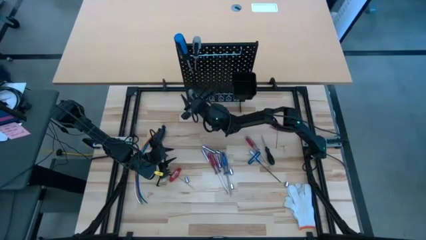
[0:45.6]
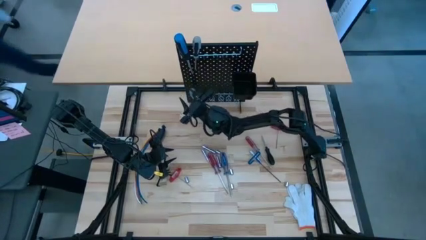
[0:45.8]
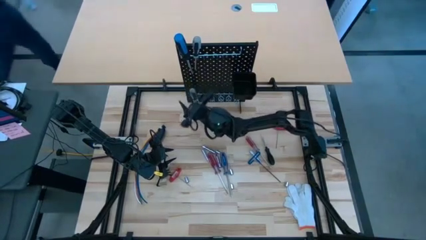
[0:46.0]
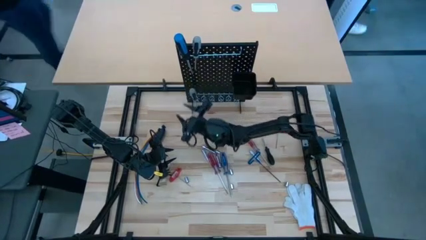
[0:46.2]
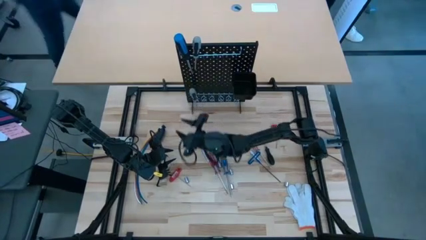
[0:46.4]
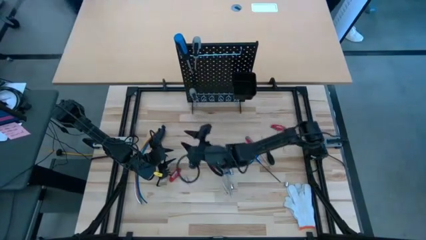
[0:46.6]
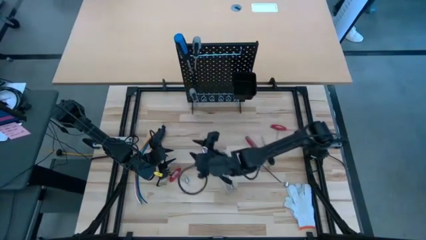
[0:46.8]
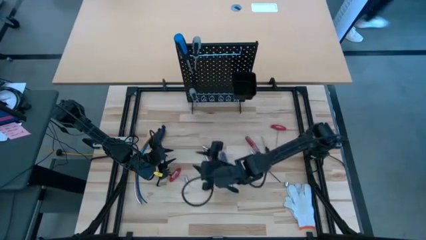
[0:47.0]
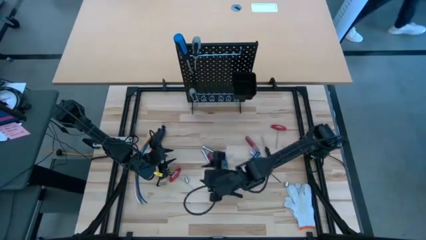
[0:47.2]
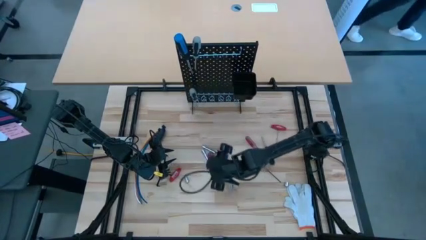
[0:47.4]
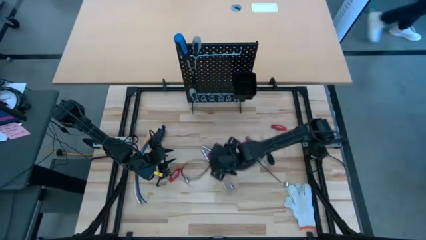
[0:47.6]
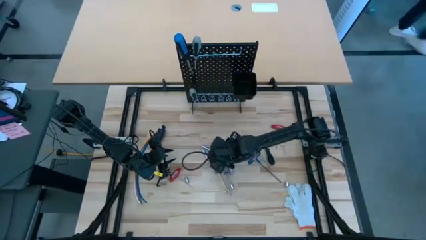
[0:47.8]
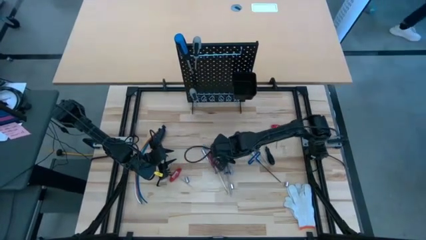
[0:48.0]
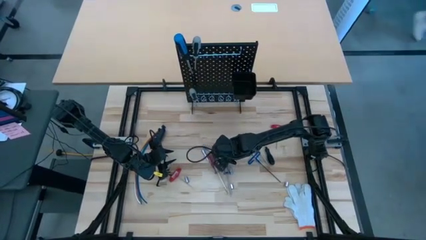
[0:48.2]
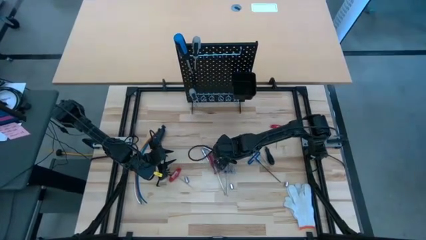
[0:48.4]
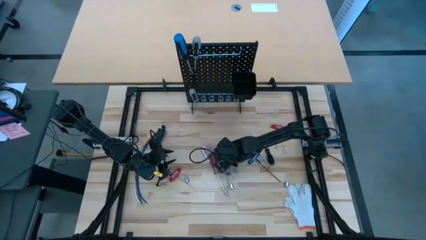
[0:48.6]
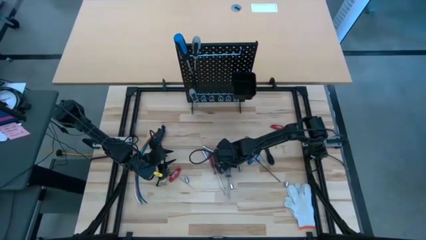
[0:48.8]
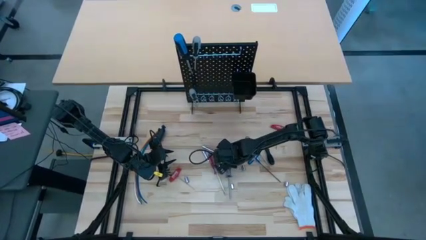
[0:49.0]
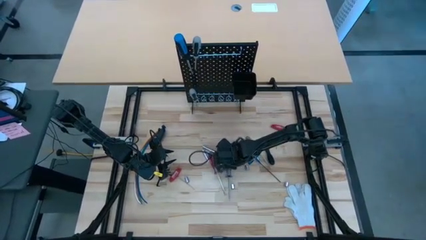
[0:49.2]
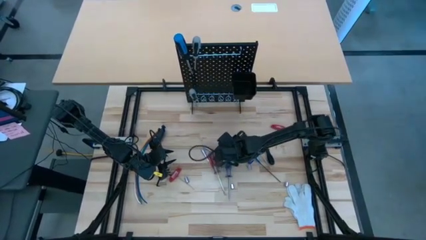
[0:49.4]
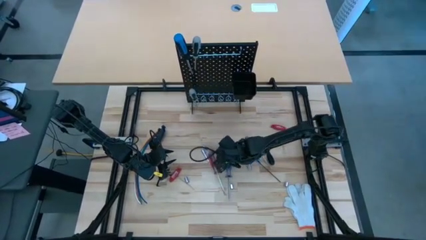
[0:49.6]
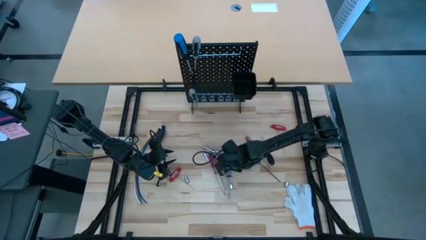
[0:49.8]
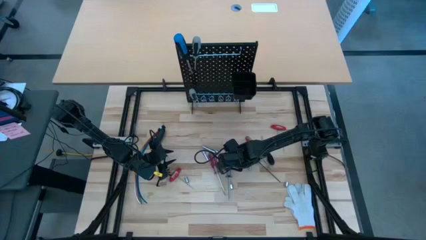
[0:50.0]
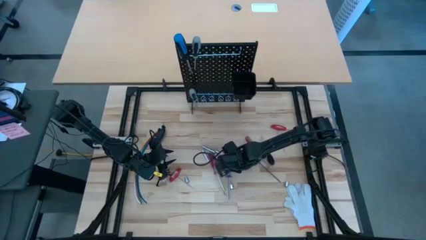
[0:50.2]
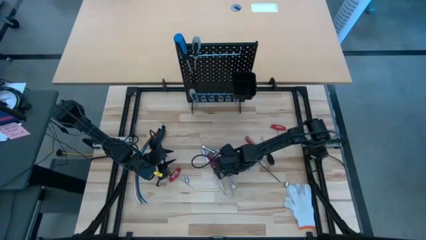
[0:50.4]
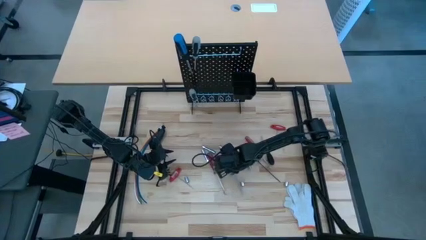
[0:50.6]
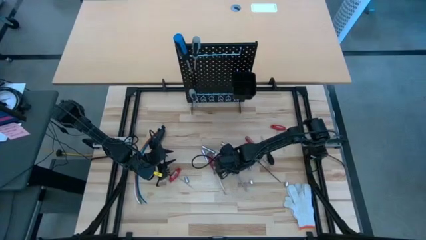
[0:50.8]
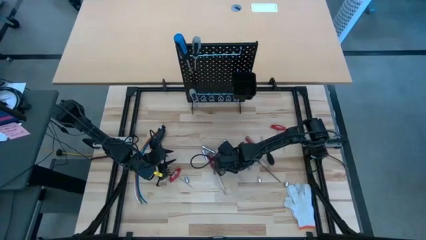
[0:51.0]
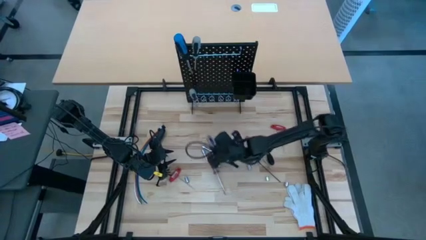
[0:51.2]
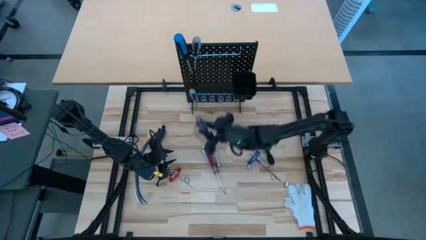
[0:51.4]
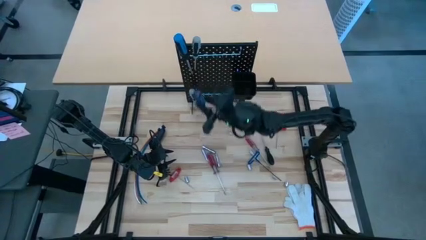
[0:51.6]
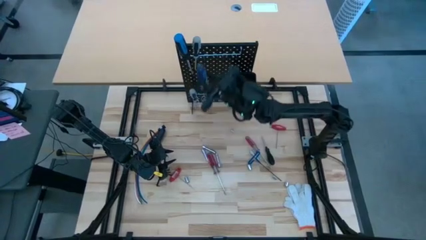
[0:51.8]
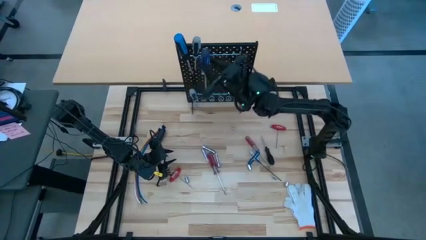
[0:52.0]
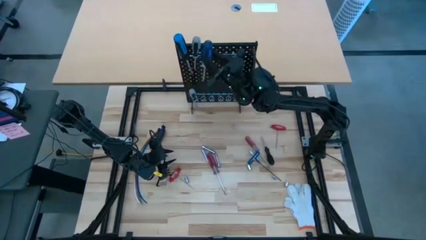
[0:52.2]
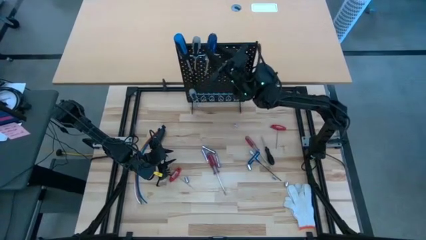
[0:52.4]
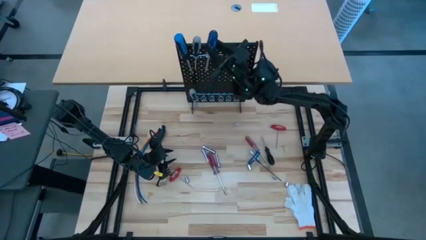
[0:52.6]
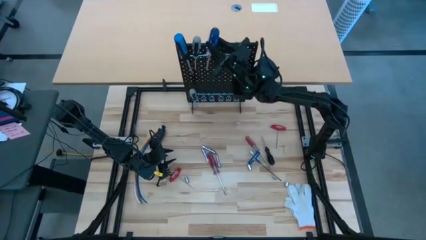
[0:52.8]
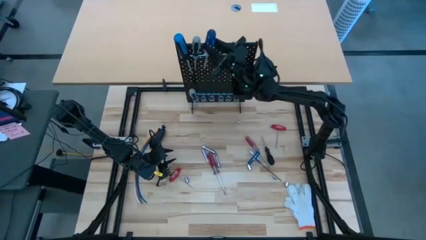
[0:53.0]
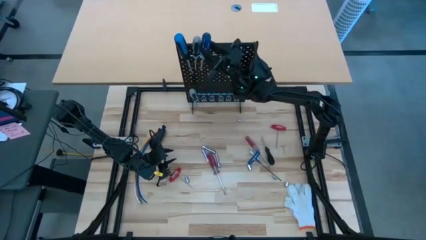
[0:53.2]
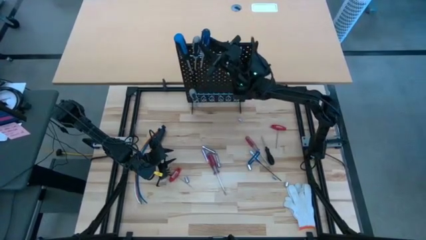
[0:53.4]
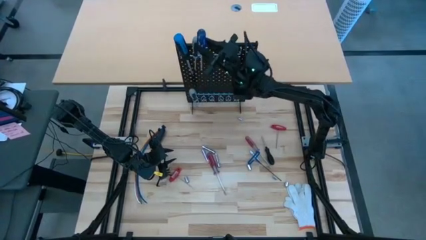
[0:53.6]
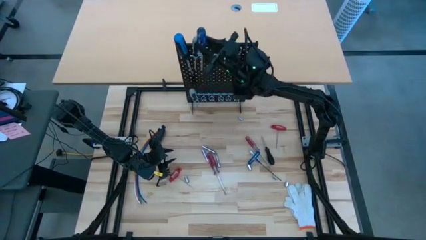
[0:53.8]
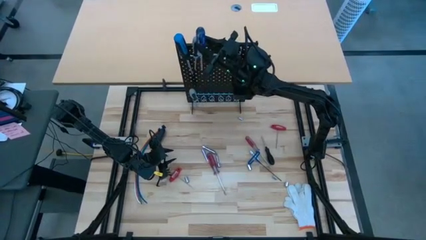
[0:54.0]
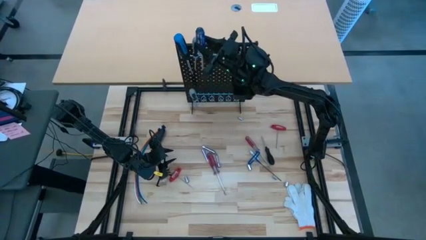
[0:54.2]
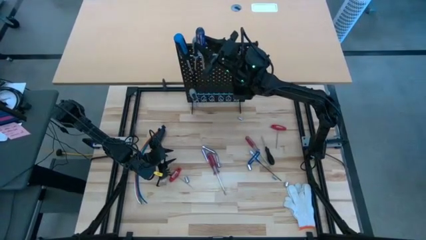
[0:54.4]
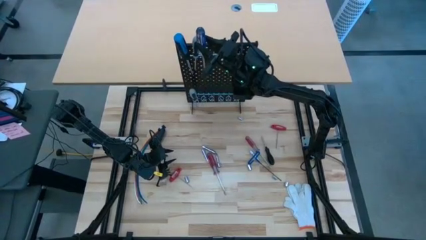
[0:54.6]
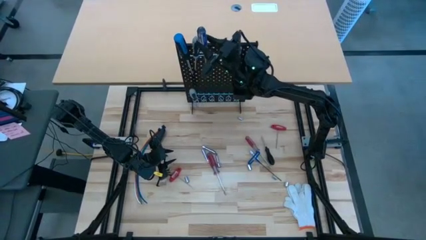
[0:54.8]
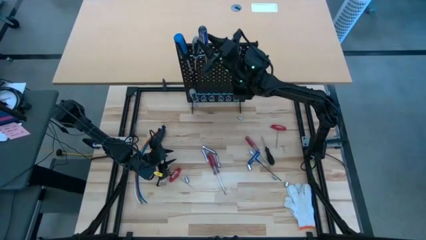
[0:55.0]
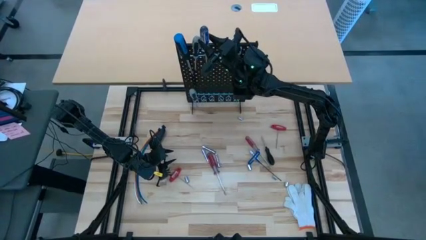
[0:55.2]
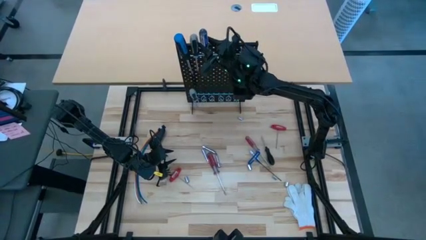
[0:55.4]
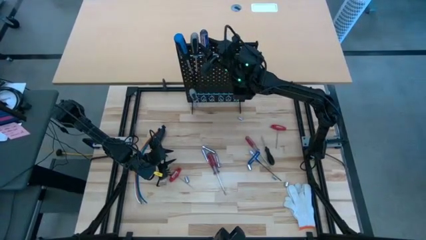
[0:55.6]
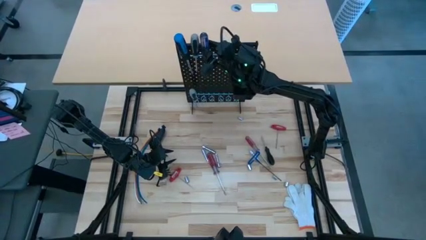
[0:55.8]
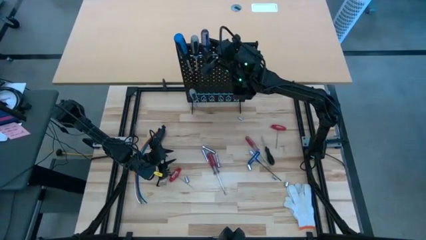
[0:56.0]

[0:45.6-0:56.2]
Task: Hang tools onto peg board
Hang the blue screwdriver on the pegboard

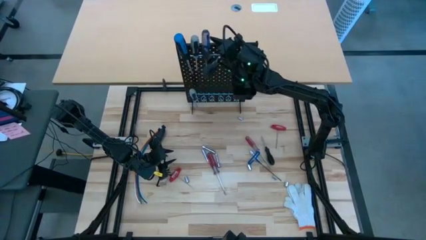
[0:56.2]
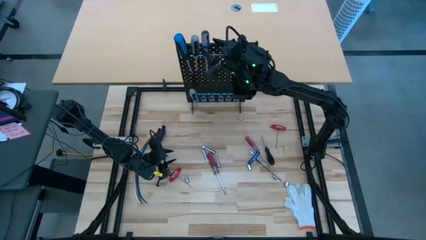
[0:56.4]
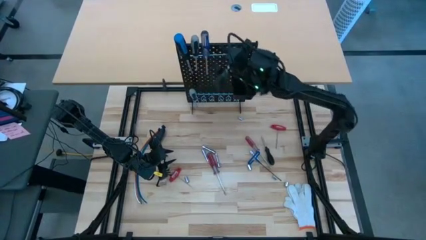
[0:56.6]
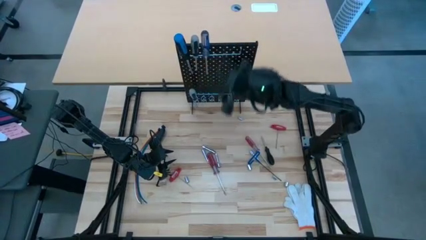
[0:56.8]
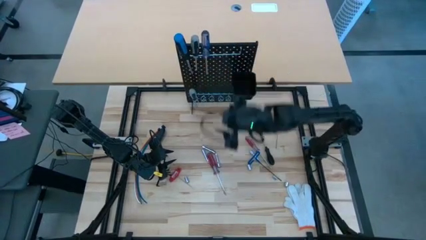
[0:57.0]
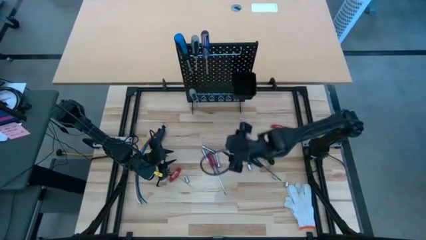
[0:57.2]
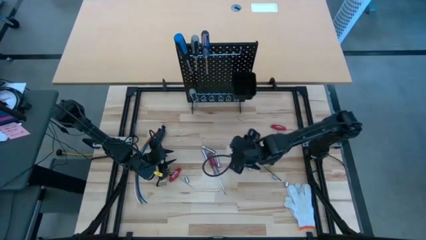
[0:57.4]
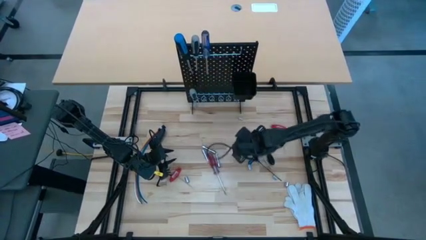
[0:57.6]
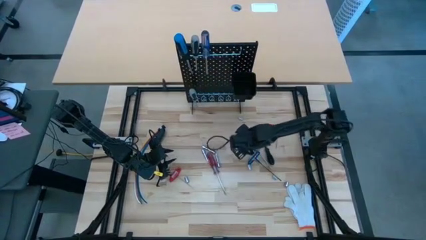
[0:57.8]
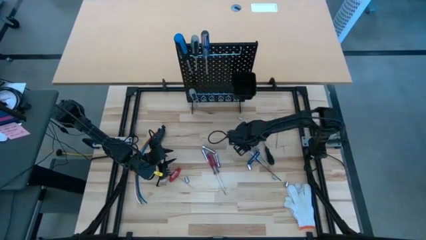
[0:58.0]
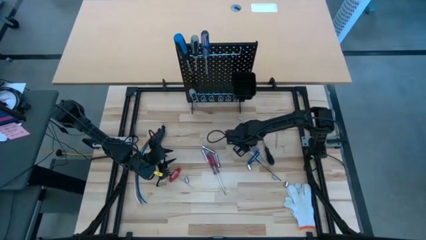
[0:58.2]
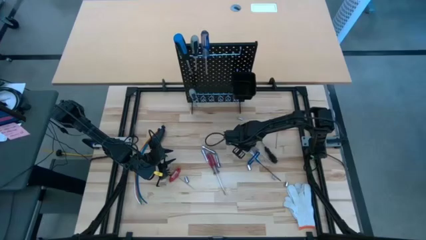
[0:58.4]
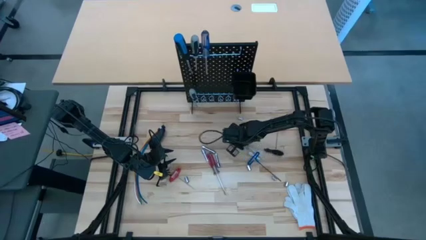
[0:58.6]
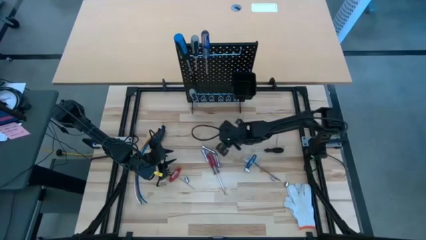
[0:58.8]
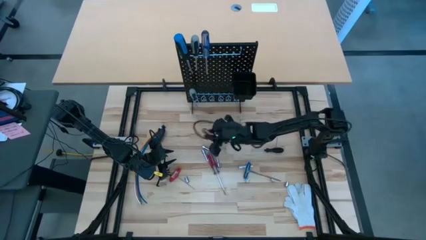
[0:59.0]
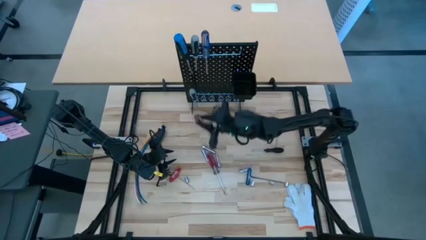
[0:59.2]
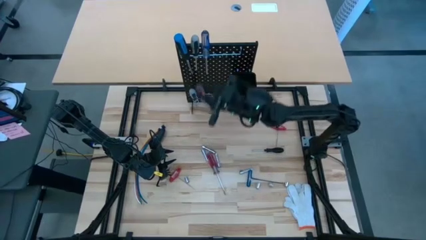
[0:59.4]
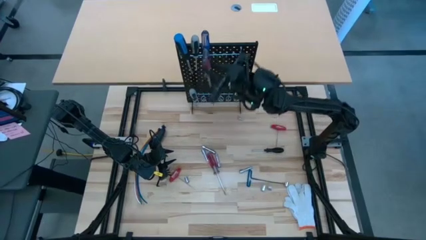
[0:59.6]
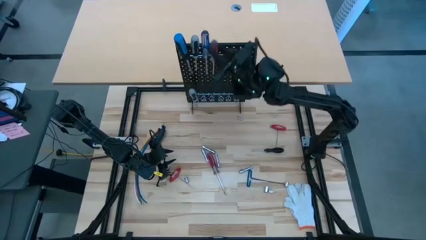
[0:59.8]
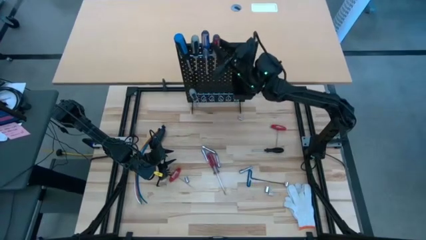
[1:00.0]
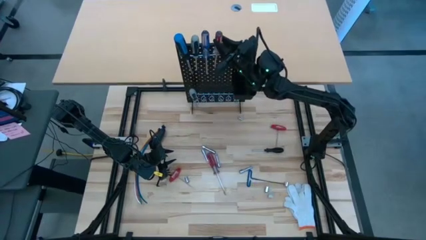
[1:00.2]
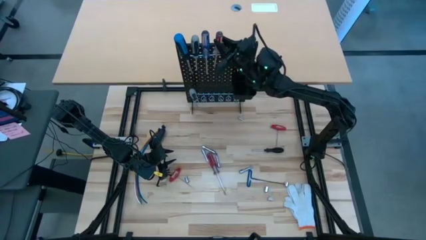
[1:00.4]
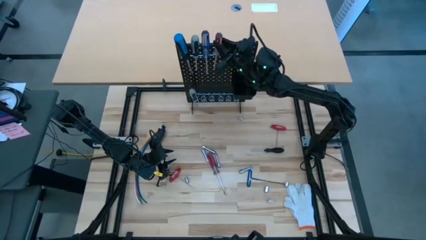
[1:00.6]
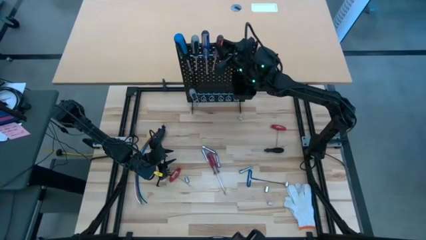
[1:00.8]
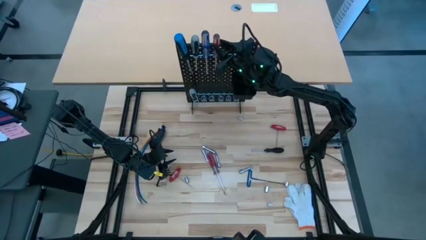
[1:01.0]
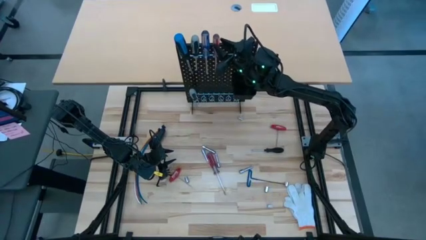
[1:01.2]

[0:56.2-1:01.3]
Hang the red screwdriver on the pegboard
